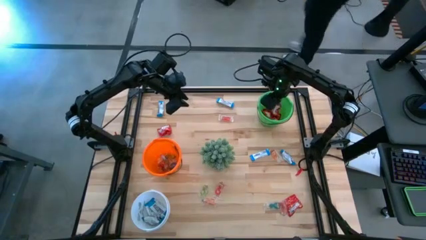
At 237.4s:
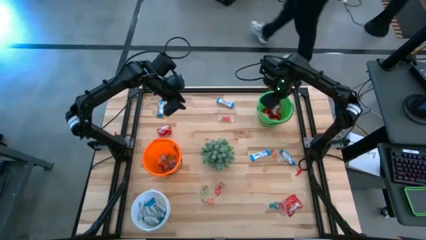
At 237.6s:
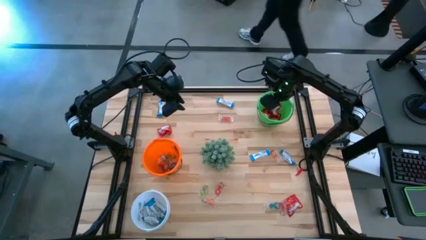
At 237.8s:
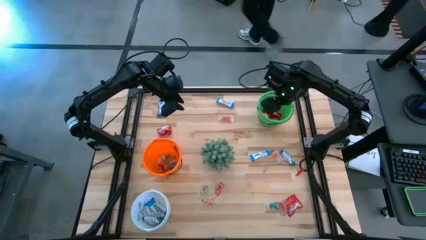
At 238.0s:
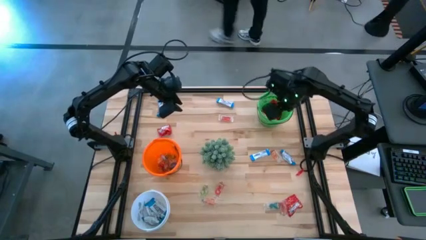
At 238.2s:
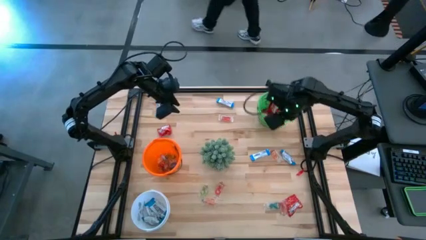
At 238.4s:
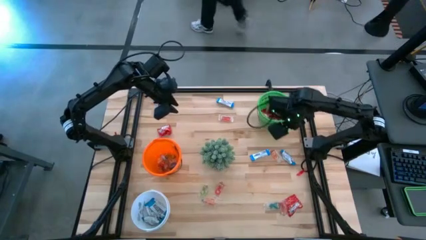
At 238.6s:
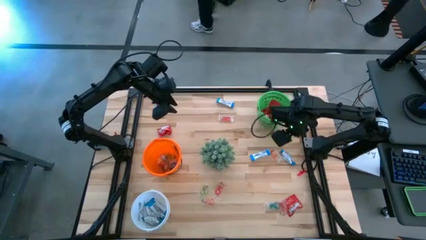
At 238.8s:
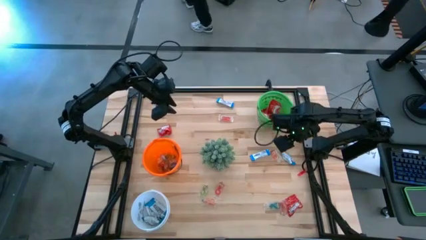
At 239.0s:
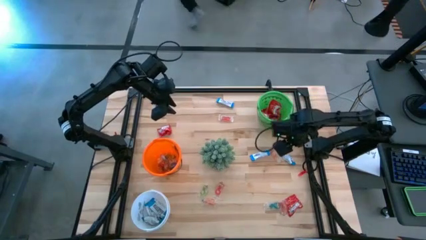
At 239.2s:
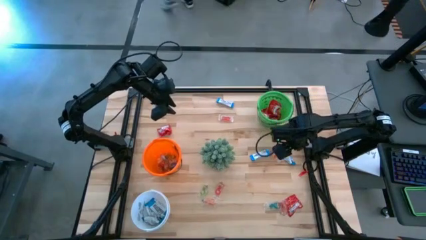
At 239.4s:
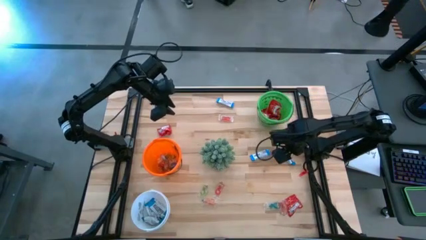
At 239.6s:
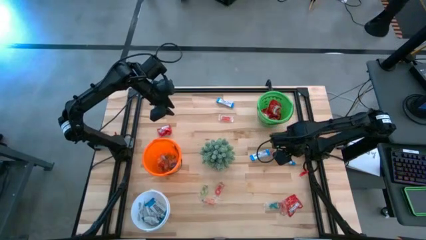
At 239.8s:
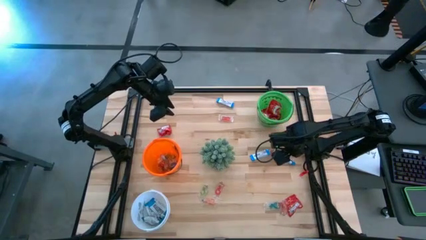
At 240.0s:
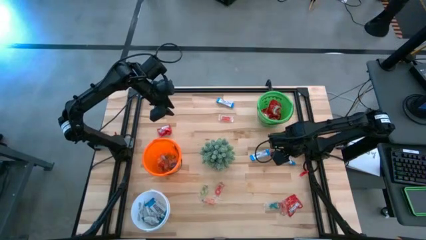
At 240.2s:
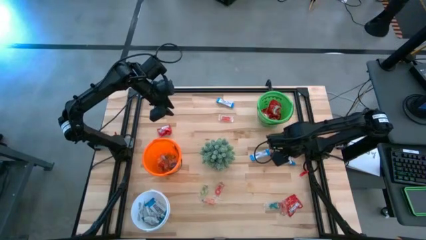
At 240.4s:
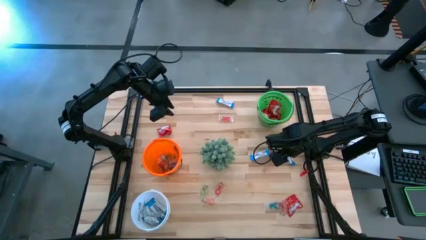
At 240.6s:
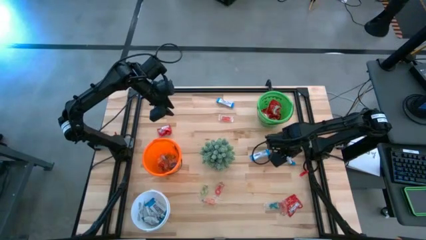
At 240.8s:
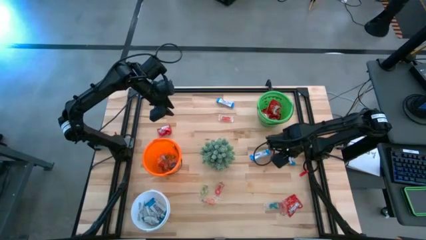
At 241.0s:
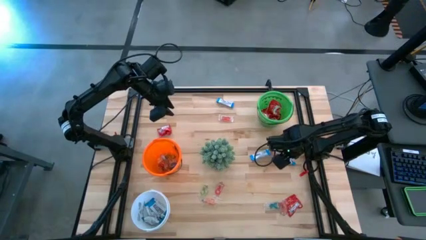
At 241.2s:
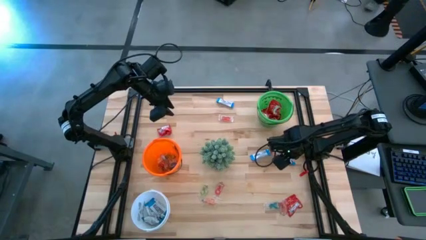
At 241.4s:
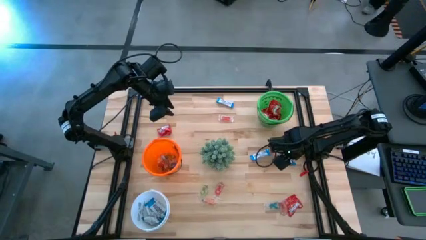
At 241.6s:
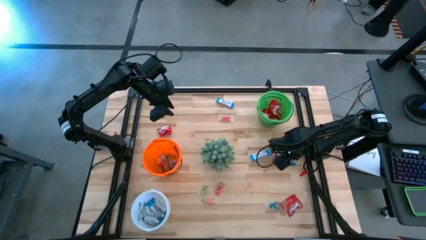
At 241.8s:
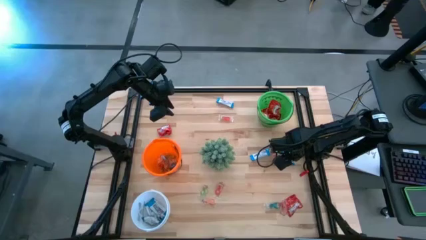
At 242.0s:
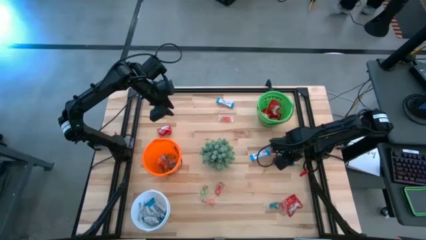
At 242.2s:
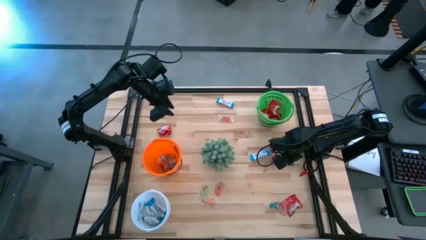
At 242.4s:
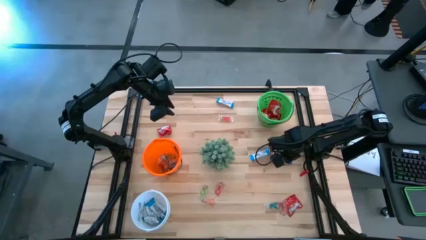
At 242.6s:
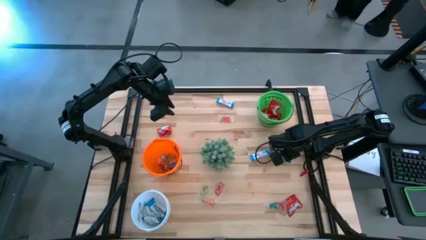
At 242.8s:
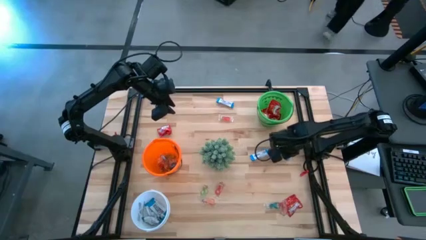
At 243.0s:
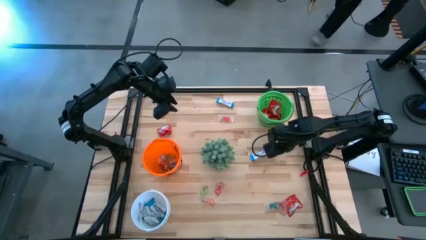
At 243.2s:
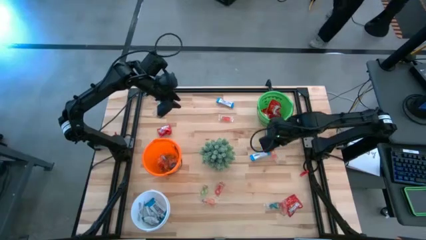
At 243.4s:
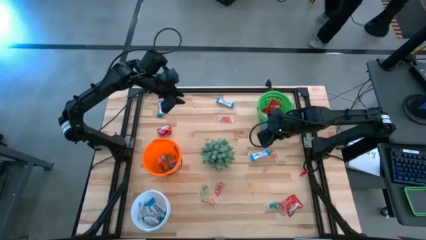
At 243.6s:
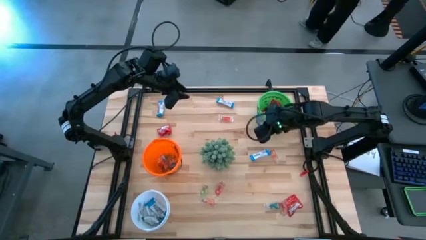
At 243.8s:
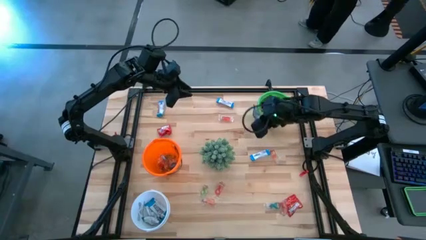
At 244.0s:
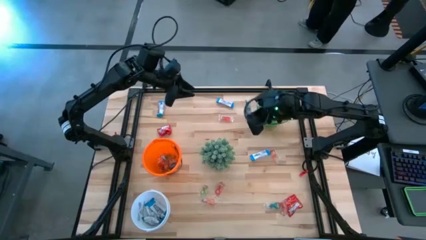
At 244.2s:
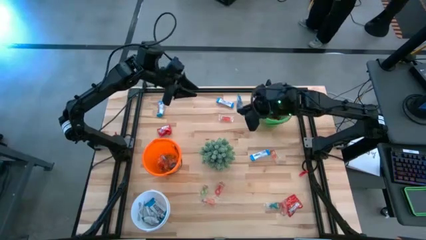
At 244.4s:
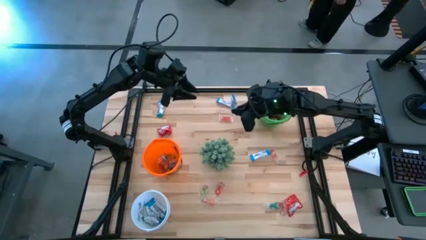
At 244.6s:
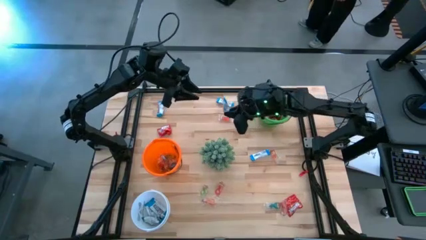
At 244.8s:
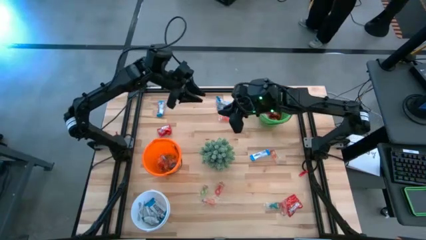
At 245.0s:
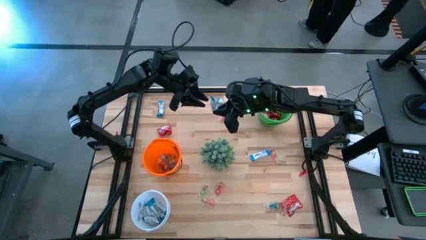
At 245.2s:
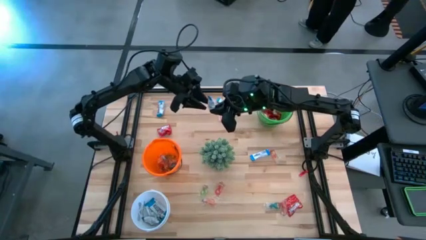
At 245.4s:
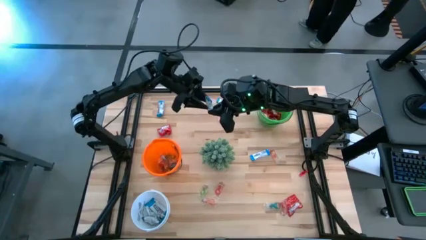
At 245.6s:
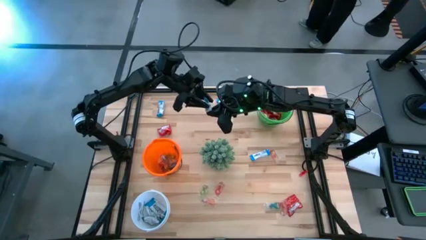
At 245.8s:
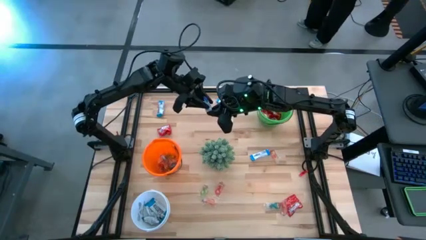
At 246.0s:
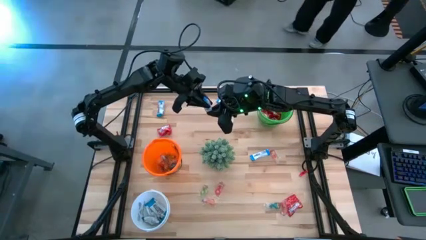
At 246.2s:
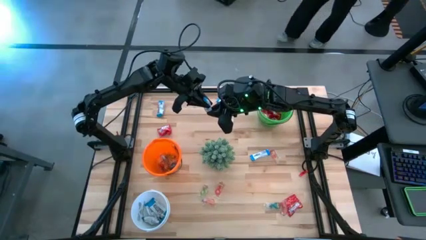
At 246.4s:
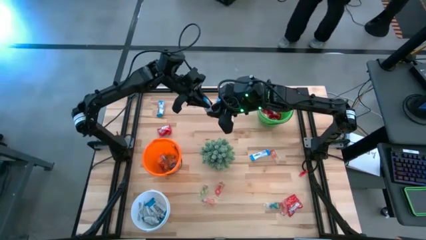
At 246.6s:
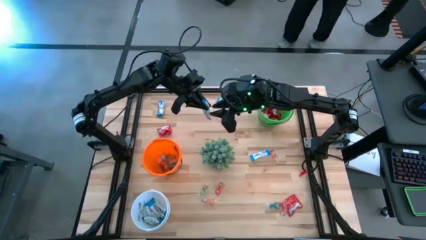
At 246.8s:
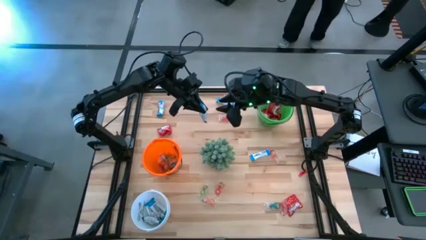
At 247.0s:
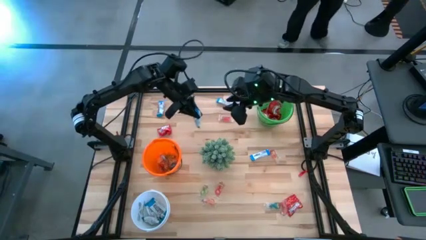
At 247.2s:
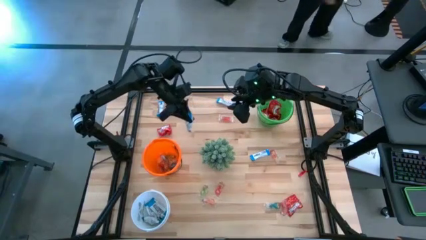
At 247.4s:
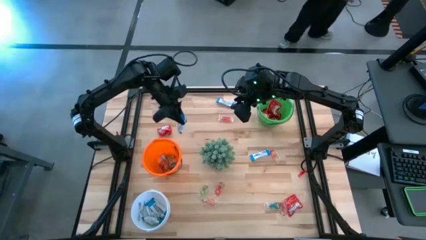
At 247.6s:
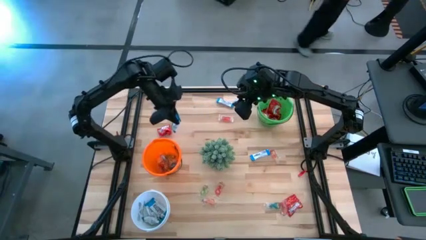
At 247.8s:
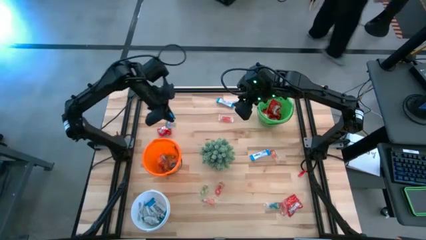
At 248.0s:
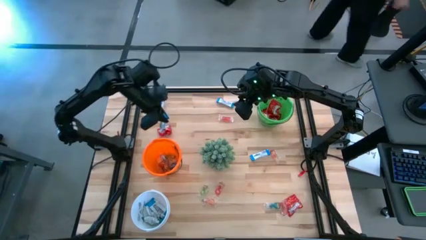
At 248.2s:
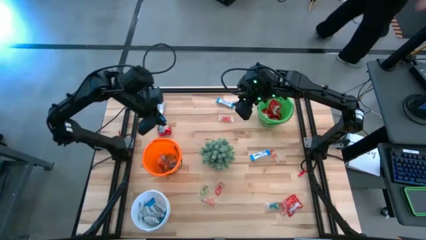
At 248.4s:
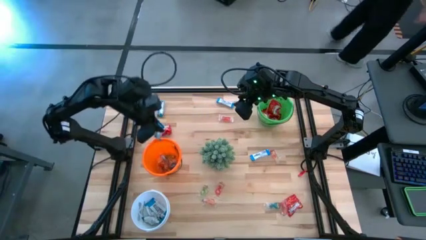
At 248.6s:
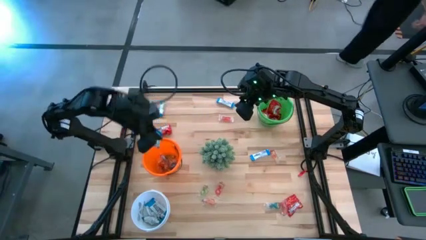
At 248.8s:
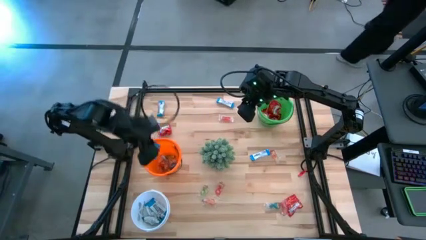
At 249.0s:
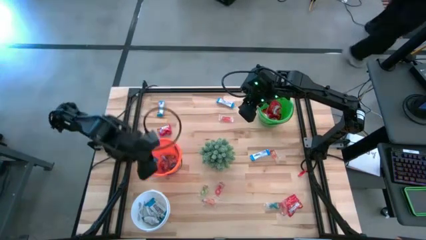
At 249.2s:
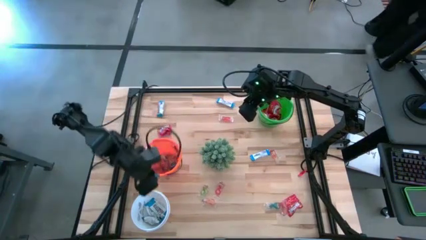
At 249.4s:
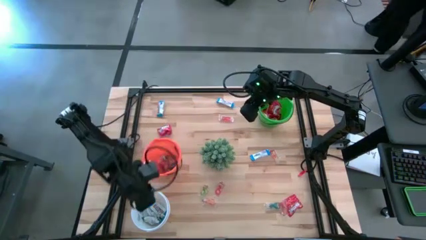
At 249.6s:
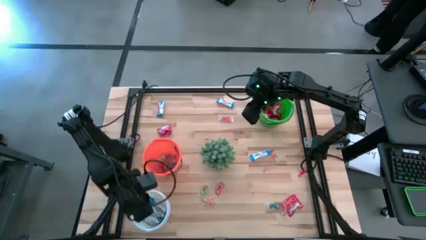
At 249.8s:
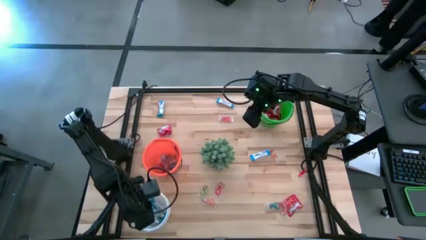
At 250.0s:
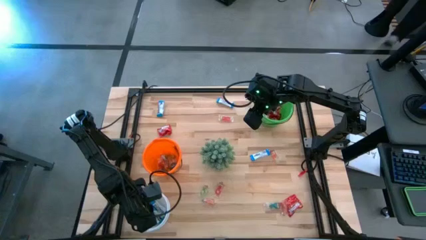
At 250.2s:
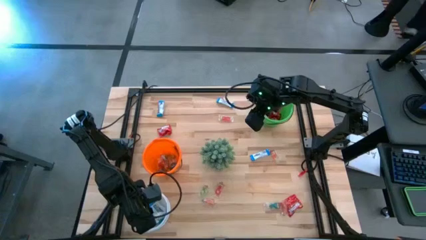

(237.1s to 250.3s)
Task: Sort candy
Put the white chocolate into the white bucket

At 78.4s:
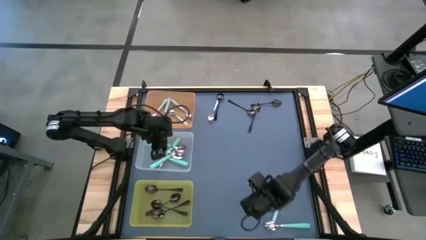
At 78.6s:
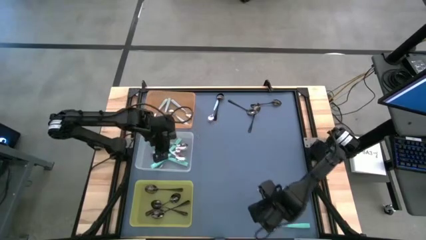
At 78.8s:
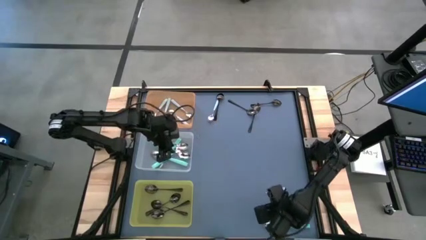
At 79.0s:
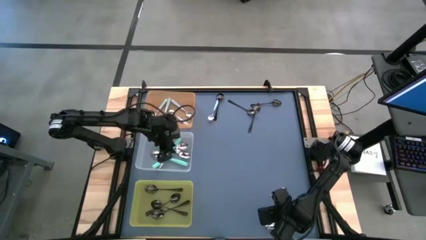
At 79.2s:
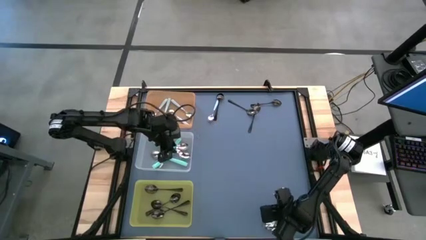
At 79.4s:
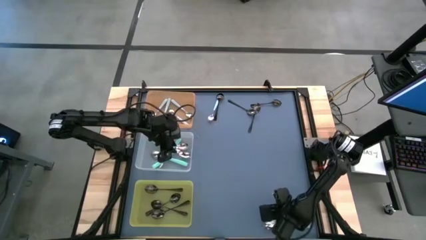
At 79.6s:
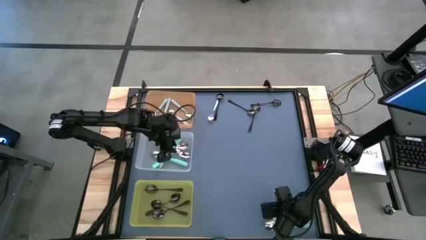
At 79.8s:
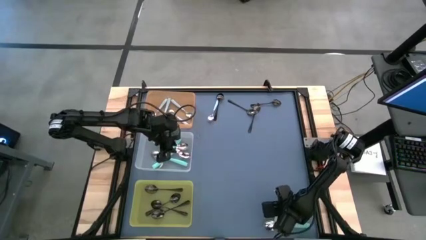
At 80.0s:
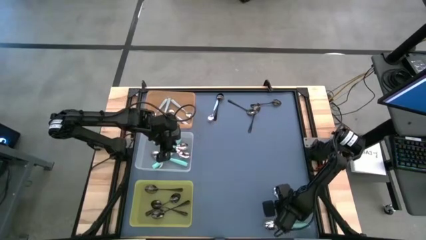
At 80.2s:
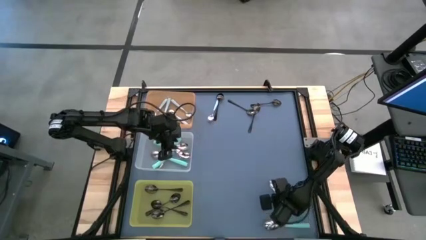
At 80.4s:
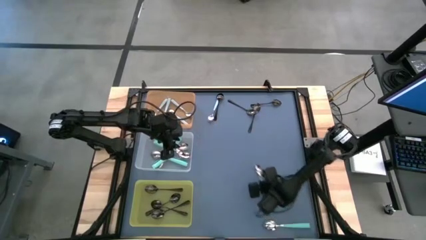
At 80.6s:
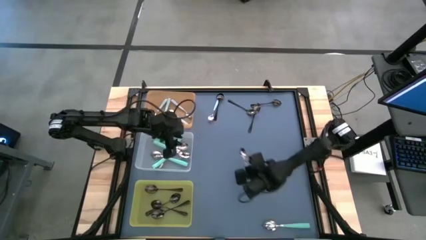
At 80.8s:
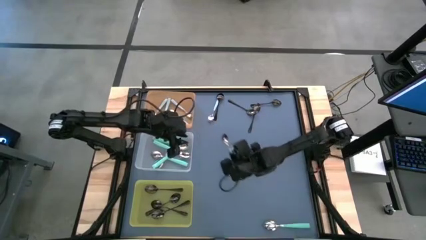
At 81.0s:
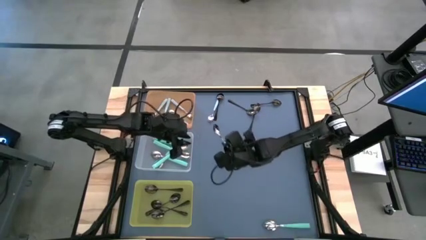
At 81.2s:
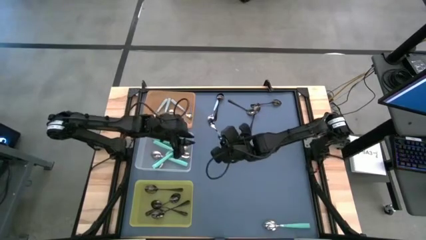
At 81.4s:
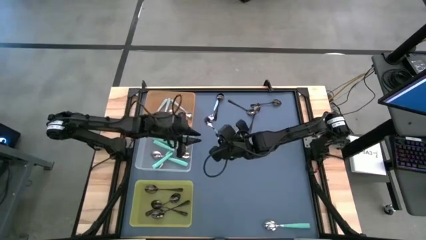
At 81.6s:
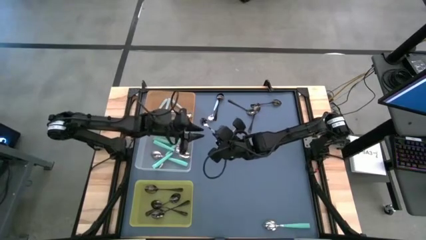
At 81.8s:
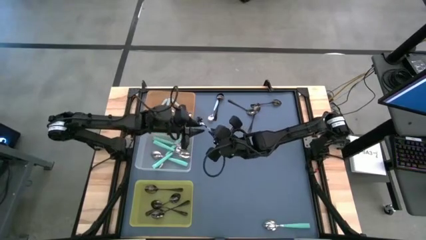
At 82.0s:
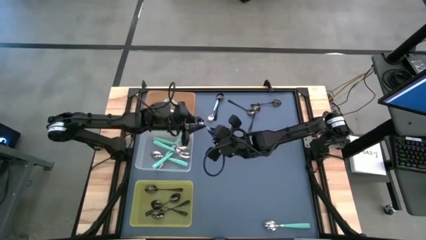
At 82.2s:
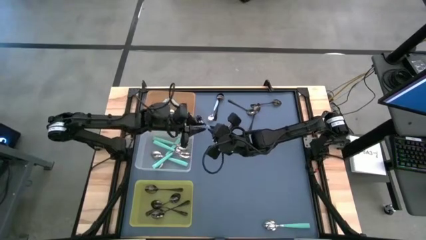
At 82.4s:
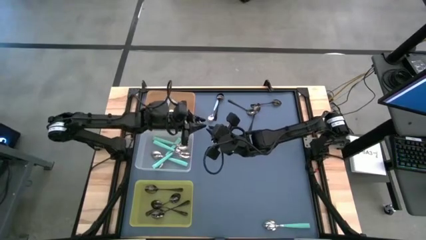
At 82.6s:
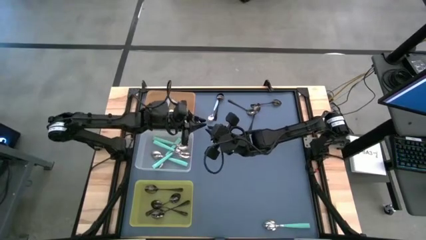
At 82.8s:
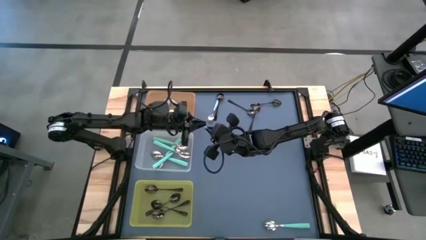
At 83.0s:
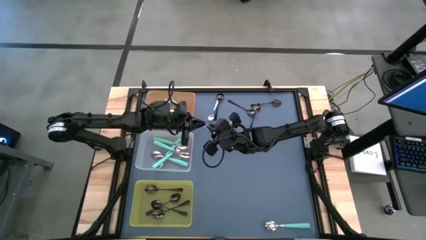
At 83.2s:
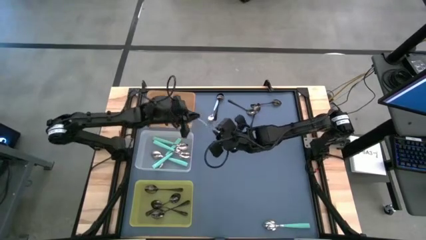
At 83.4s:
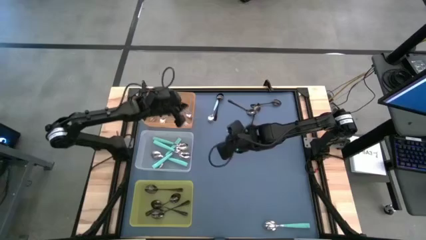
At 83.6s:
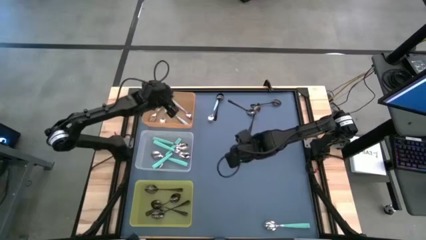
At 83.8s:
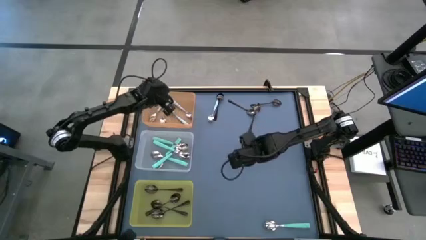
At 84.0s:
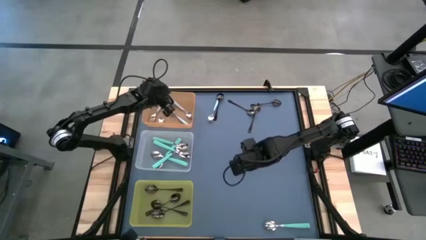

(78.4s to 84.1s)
Task: Sort silverware by color (type)
Put the light blue spoon into the orange bin
